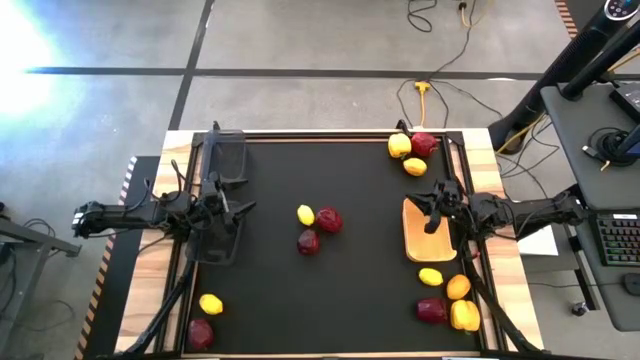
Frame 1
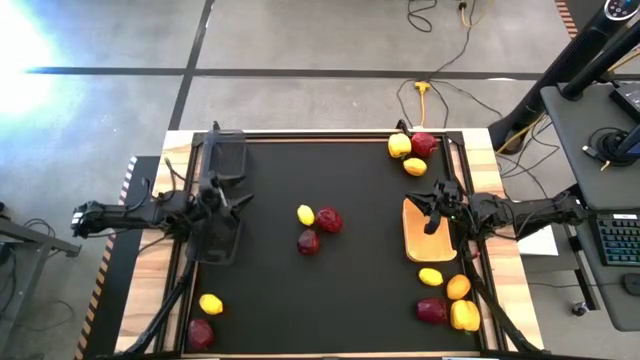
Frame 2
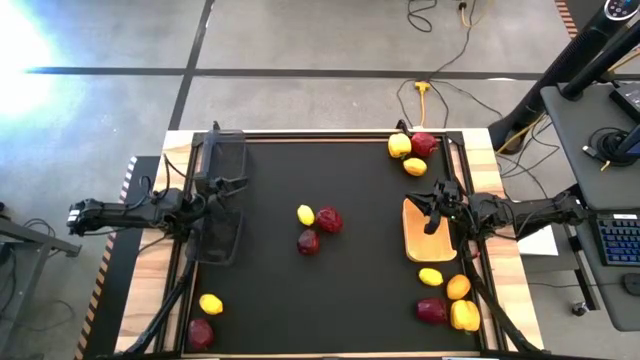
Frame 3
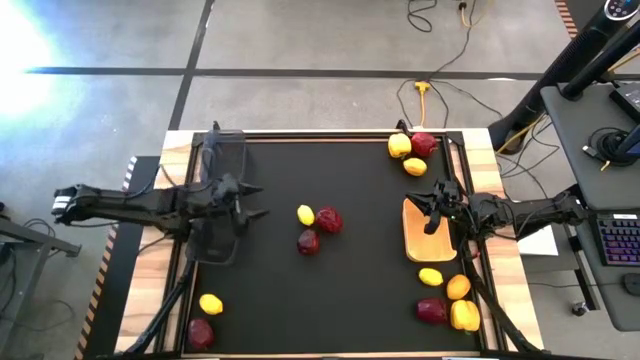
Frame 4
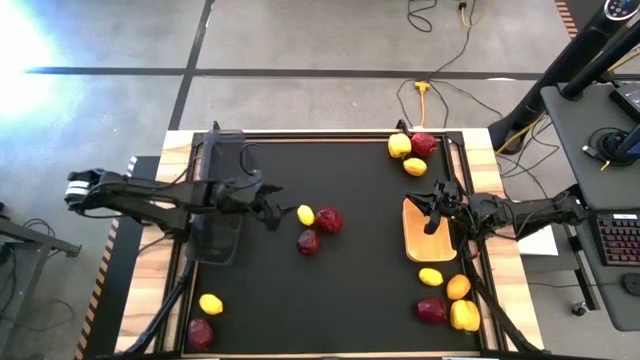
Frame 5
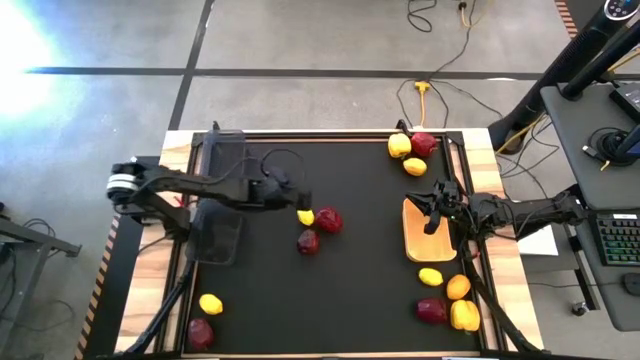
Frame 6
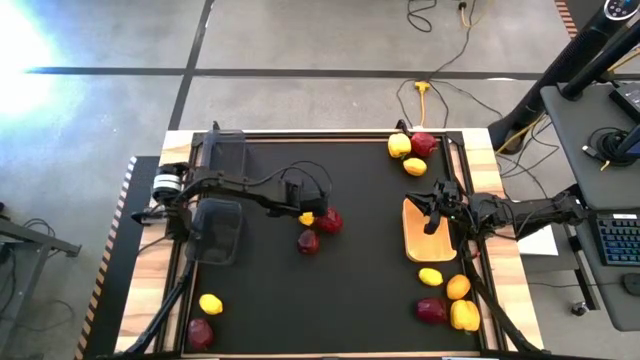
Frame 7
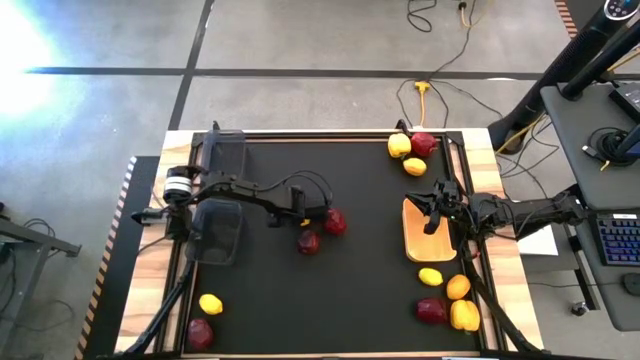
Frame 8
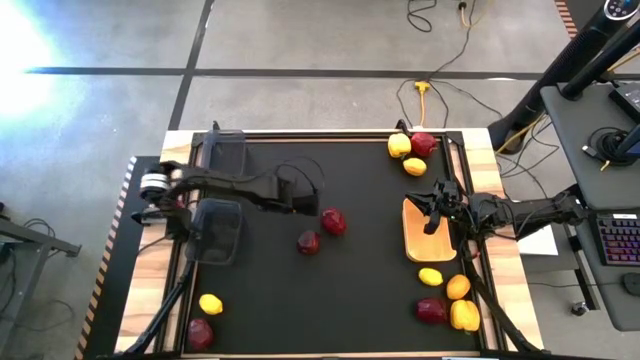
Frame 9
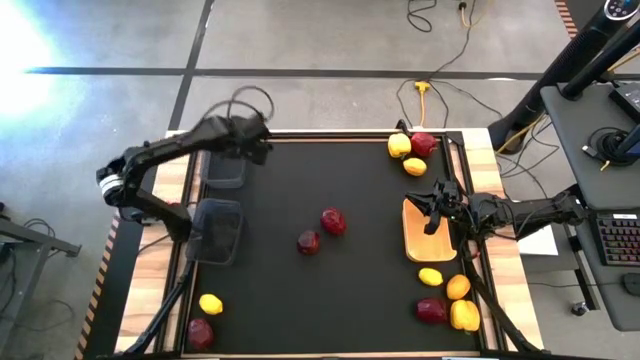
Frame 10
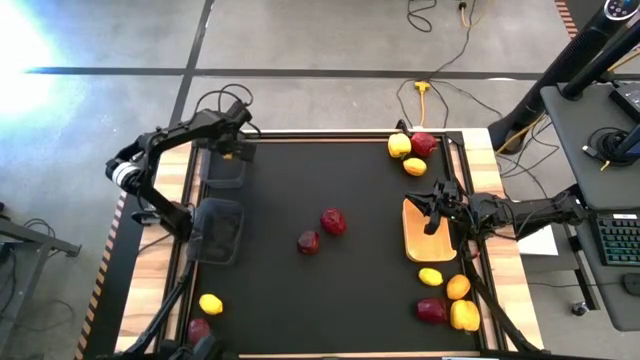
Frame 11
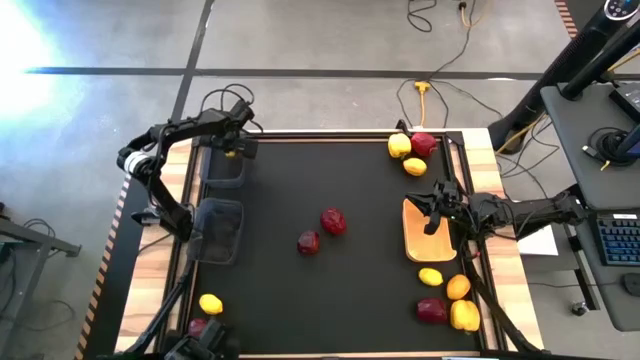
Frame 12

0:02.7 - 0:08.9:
Task: Sort produce into baskets
Put the yellow lemon into the top black bin

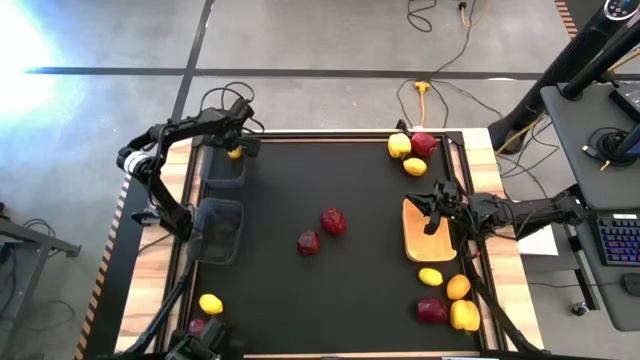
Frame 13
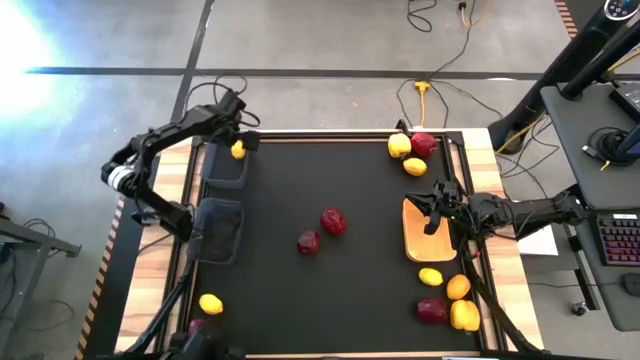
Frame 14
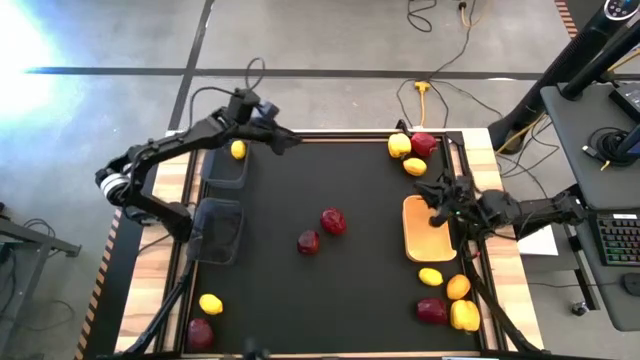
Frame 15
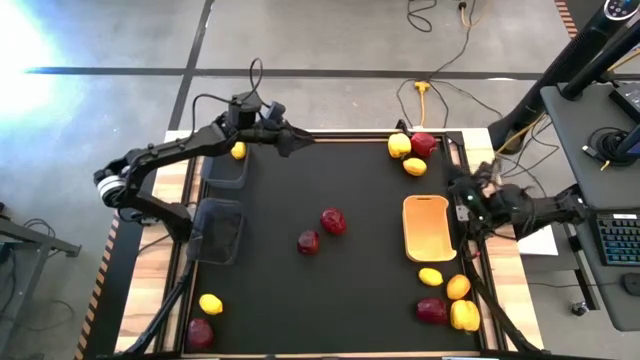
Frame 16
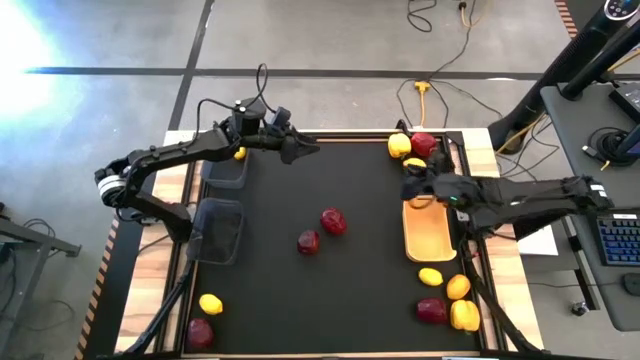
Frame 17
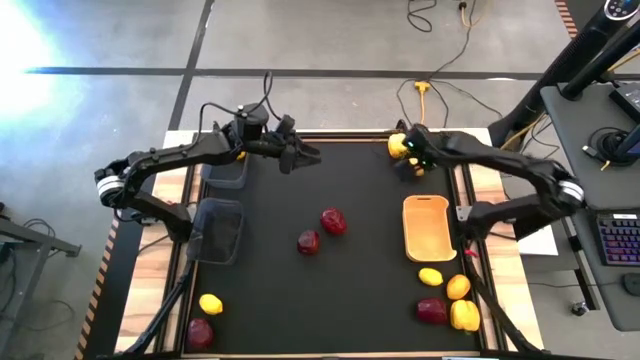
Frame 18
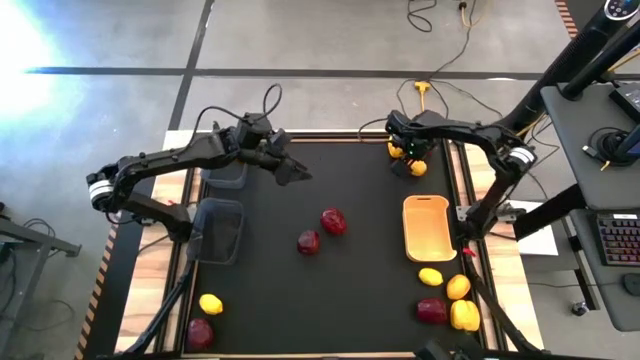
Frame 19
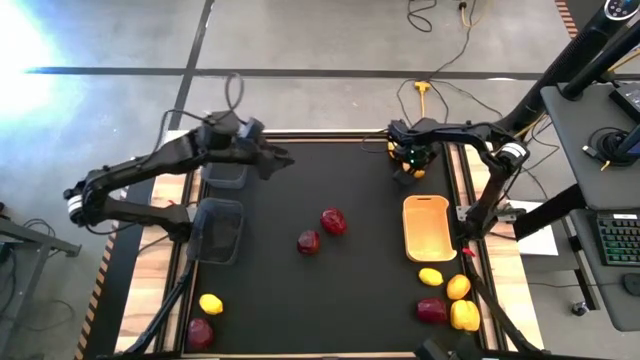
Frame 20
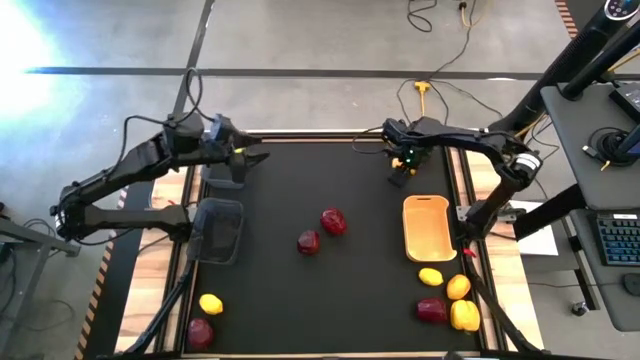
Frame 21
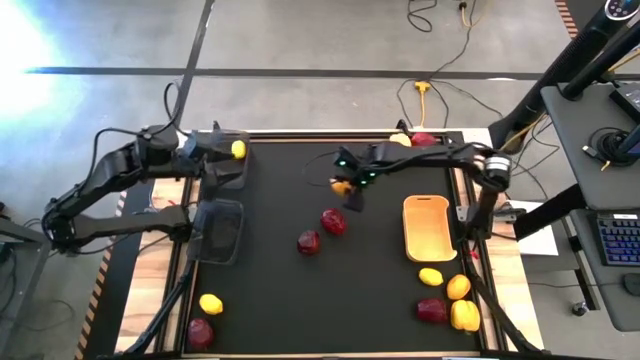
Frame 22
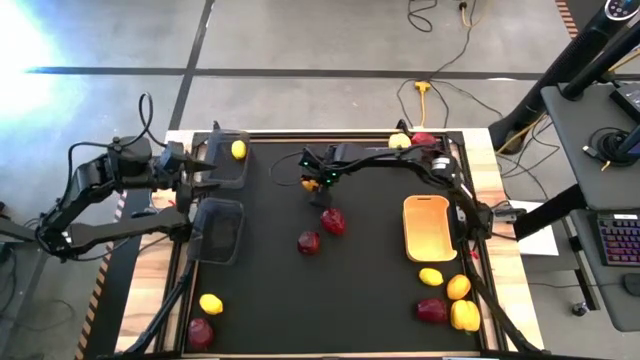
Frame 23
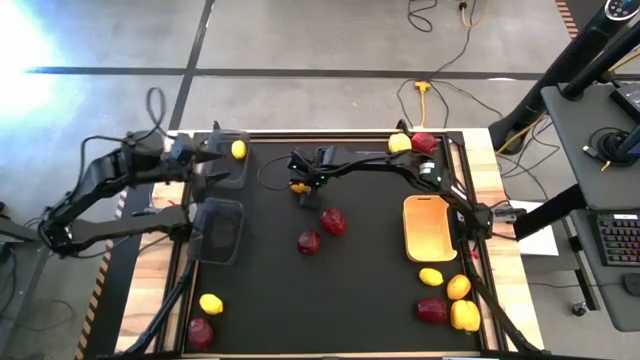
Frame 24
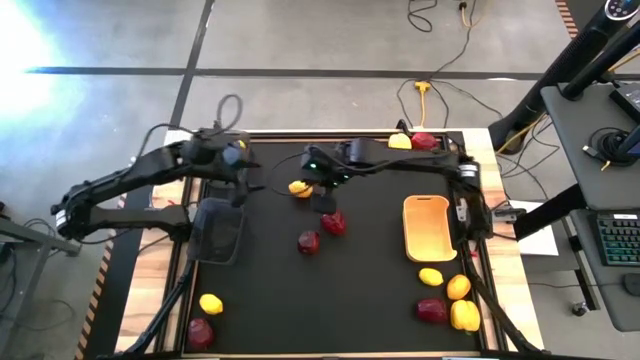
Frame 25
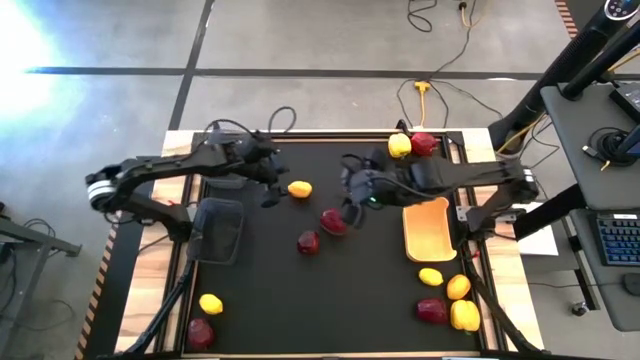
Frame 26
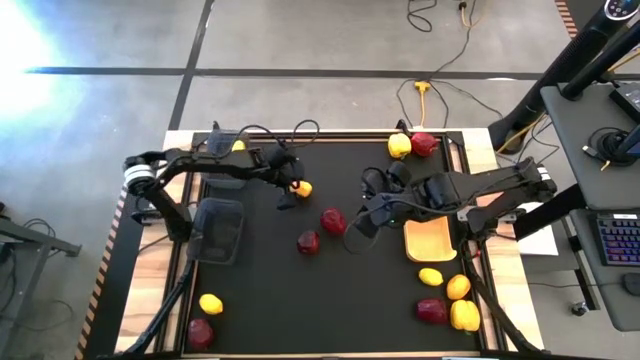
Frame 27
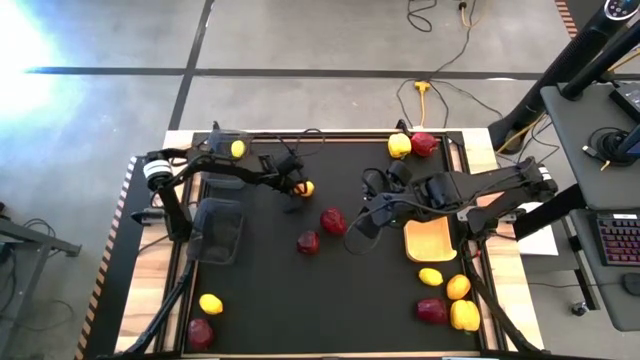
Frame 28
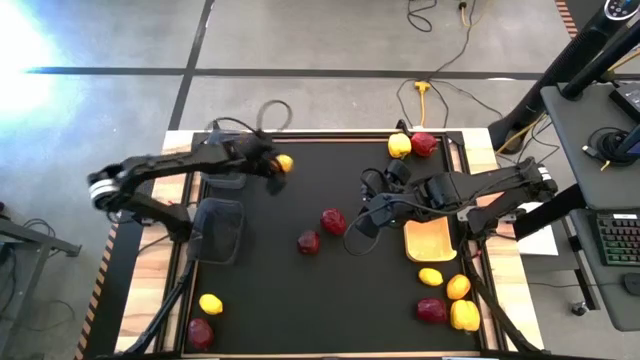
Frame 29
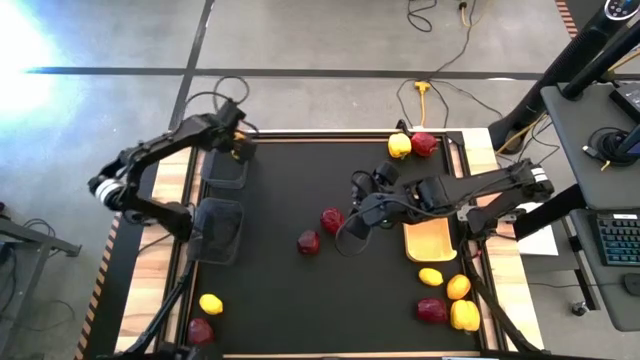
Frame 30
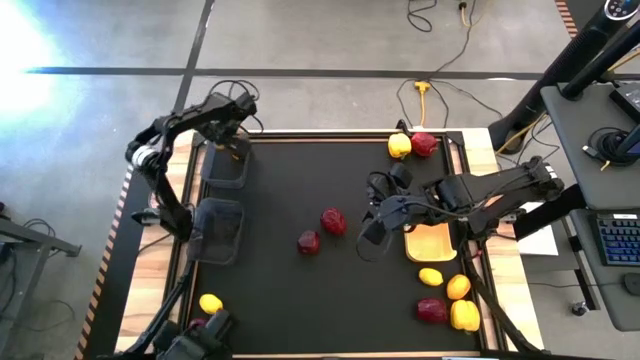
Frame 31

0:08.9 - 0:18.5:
Put the yellow lemon into the top black bin

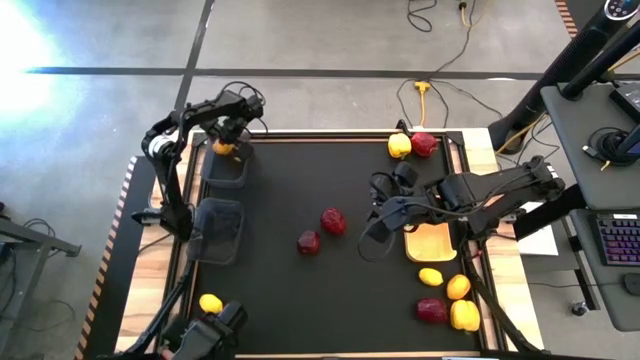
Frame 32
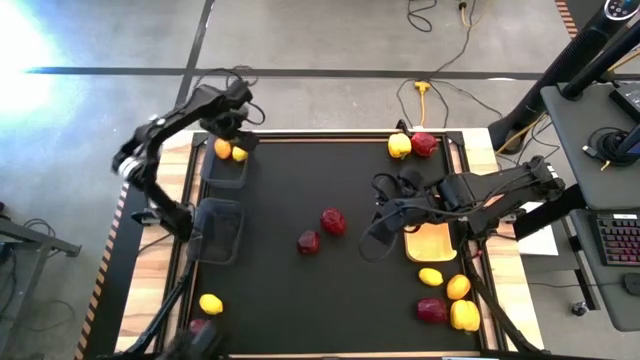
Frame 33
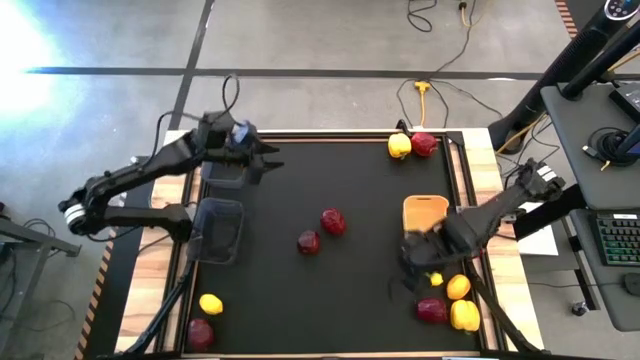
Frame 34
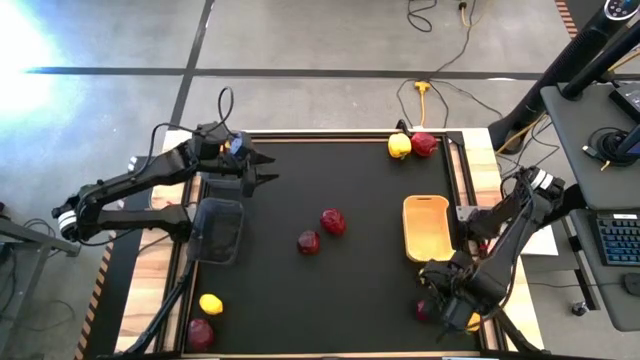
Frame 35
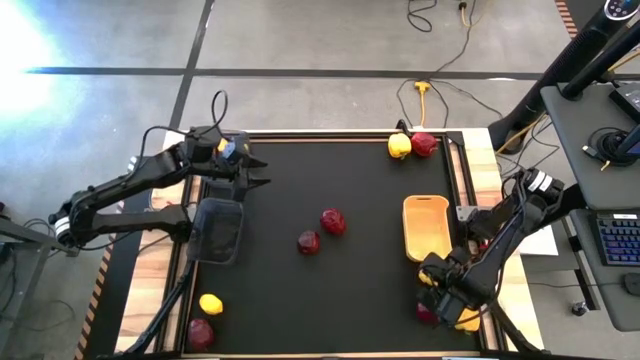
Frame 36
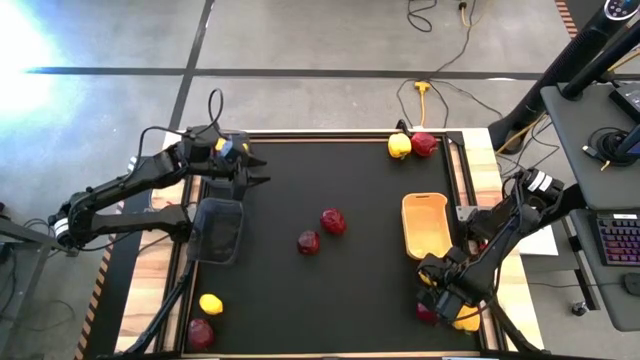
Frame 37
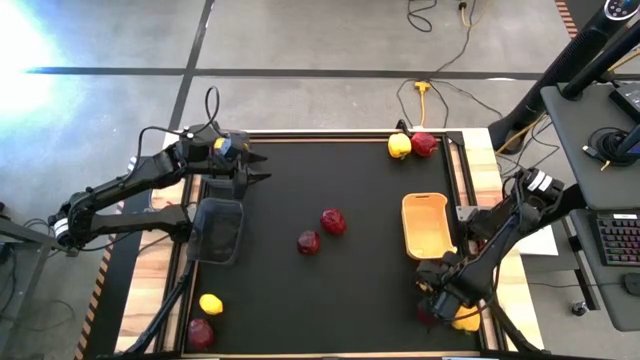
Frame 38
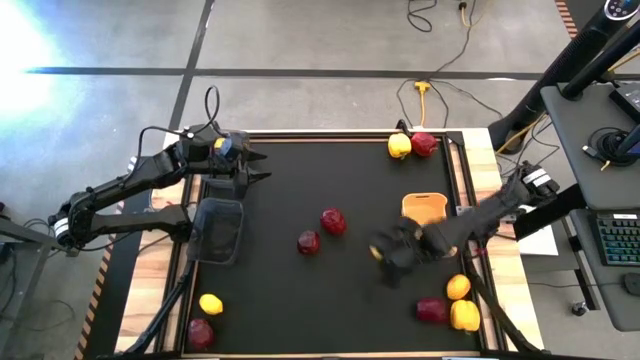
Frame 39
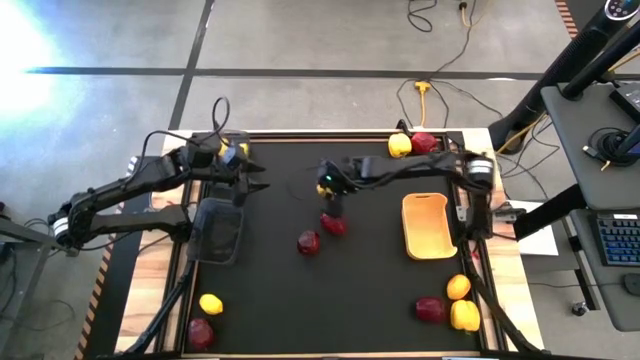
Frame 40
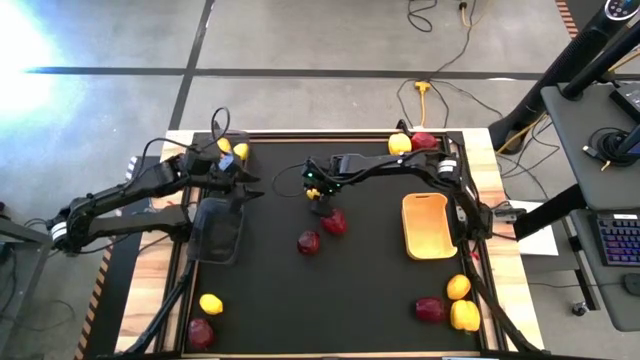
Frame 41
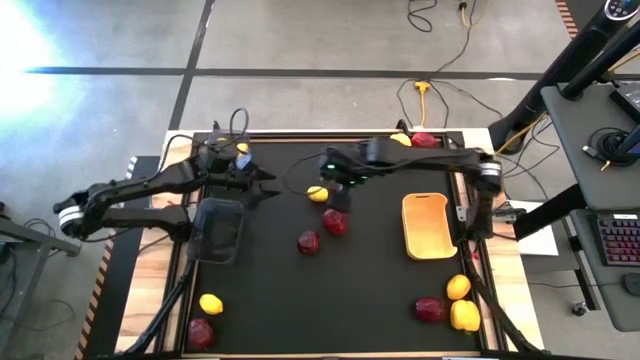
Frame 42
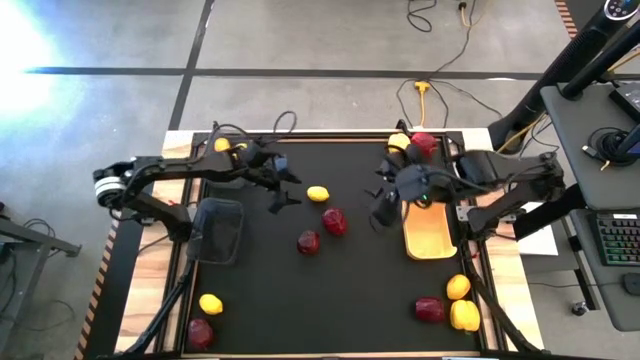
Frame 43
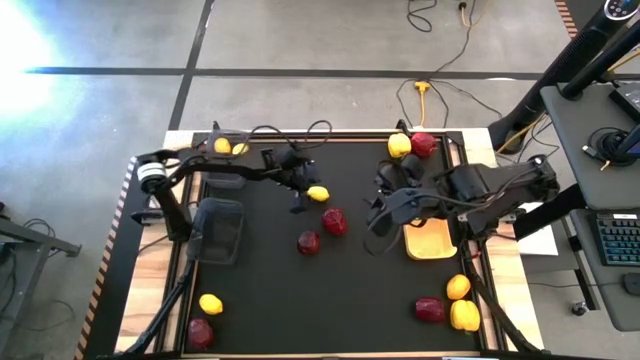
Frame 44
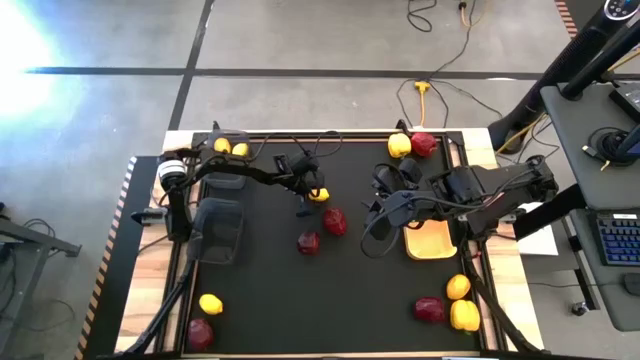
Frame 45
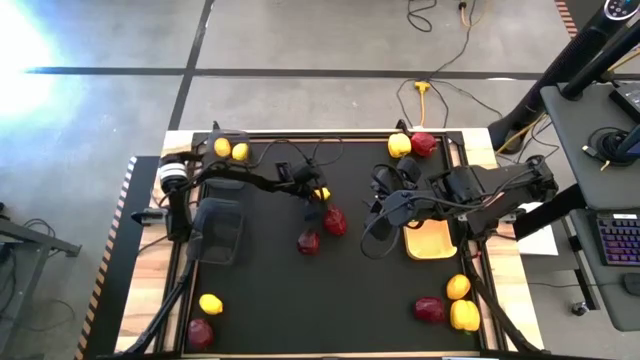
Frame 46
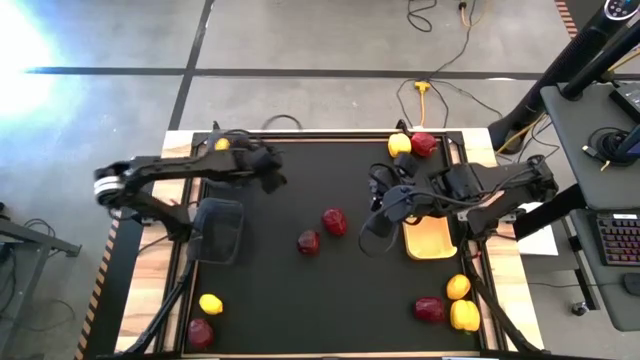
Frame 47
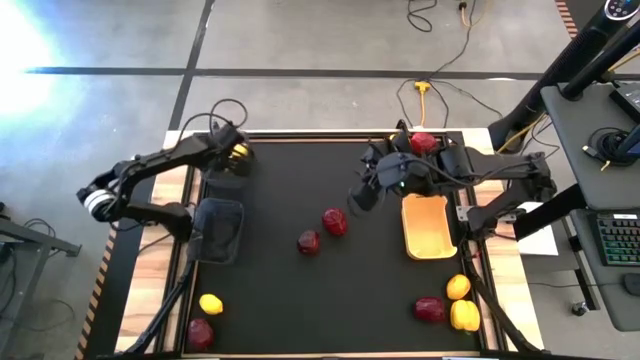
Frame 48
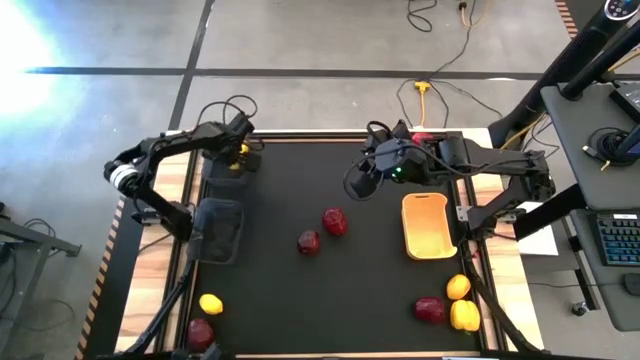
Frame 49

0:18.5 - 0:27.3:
Put the yellow lemon into the top black bin
